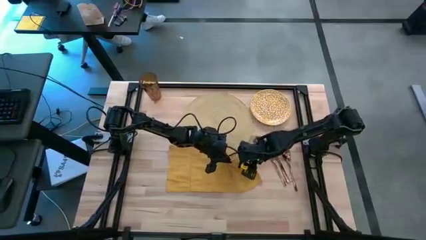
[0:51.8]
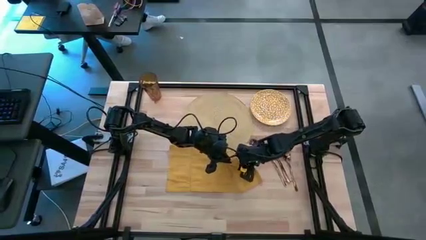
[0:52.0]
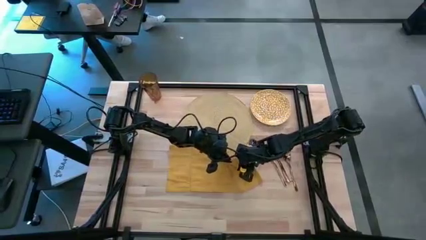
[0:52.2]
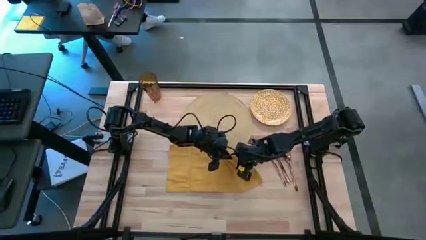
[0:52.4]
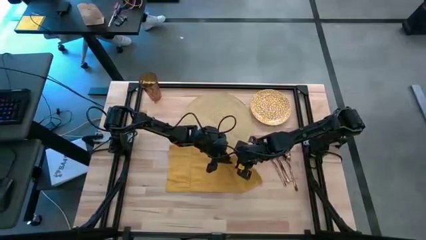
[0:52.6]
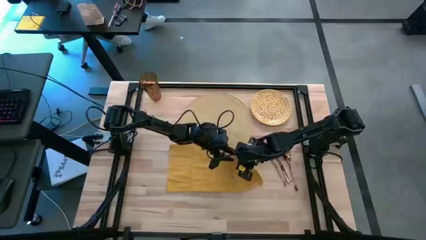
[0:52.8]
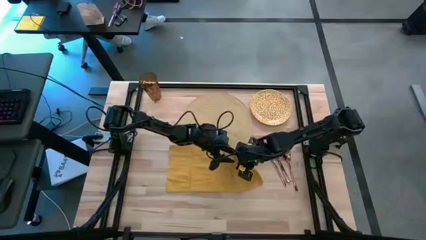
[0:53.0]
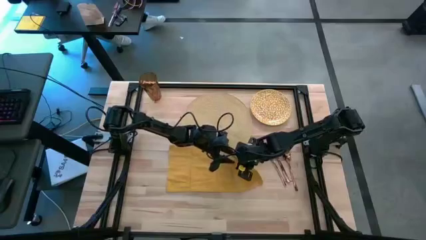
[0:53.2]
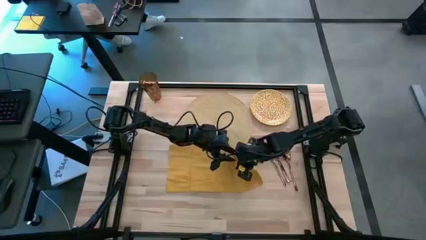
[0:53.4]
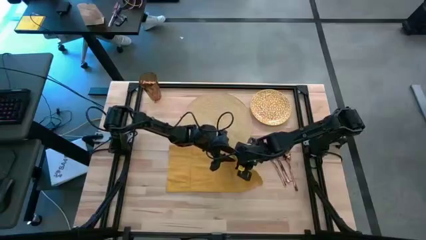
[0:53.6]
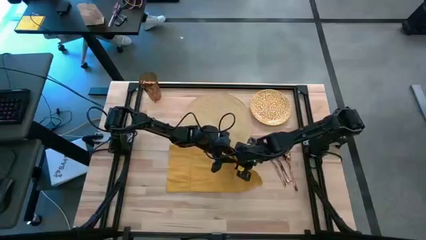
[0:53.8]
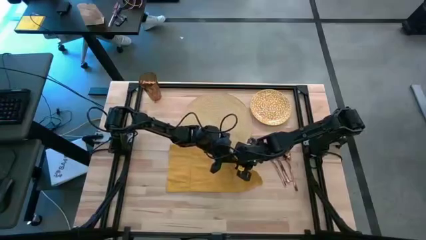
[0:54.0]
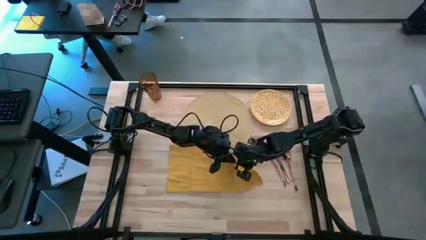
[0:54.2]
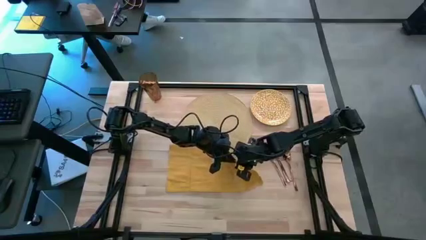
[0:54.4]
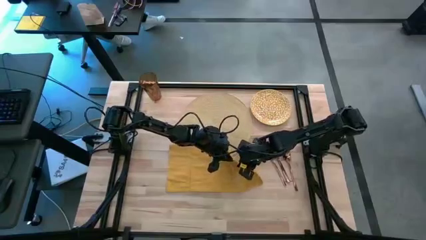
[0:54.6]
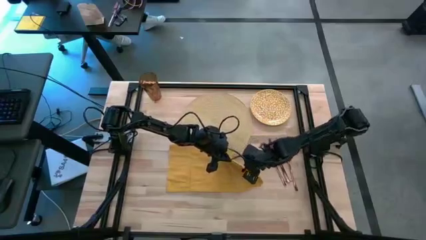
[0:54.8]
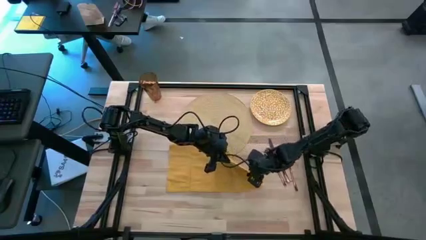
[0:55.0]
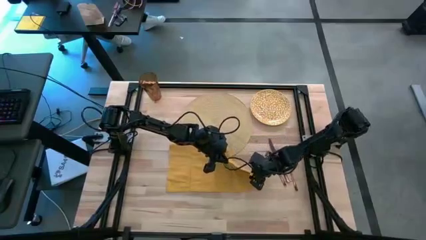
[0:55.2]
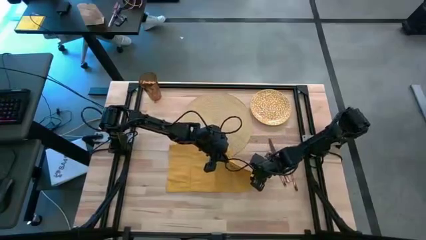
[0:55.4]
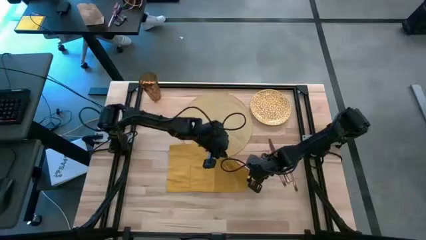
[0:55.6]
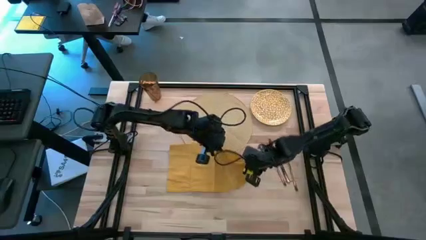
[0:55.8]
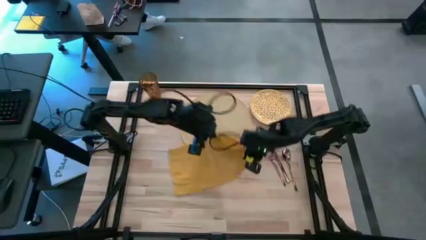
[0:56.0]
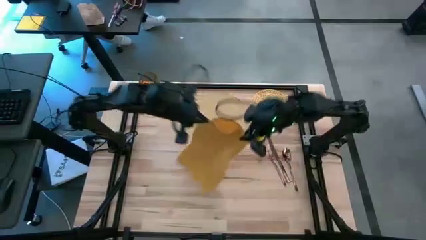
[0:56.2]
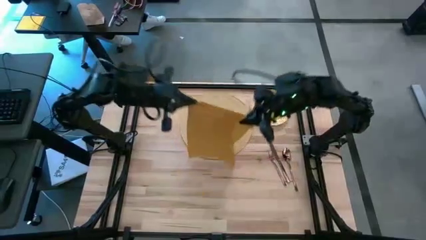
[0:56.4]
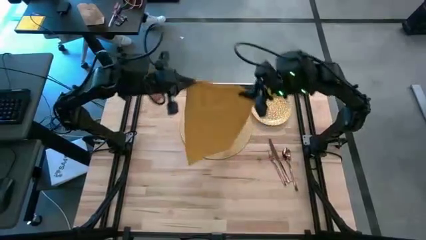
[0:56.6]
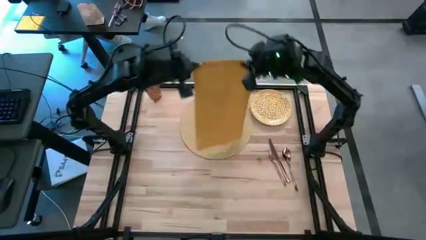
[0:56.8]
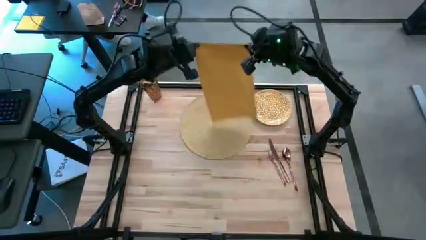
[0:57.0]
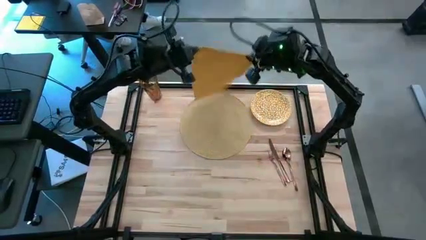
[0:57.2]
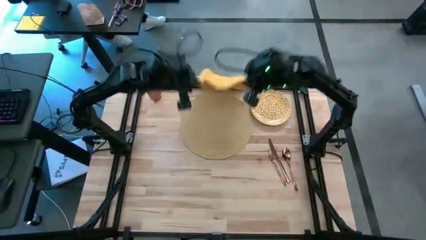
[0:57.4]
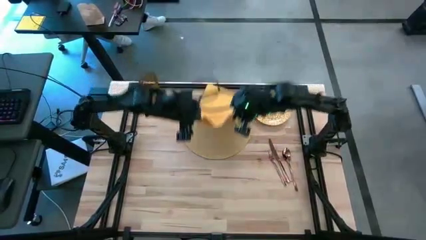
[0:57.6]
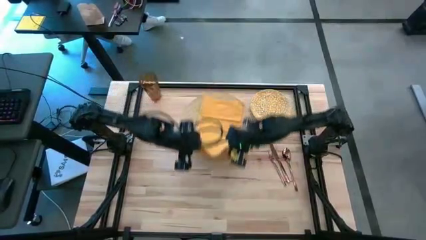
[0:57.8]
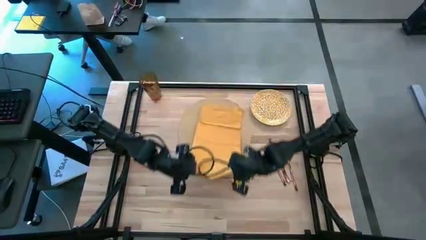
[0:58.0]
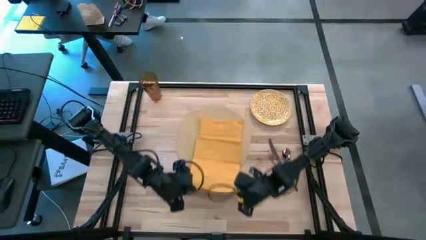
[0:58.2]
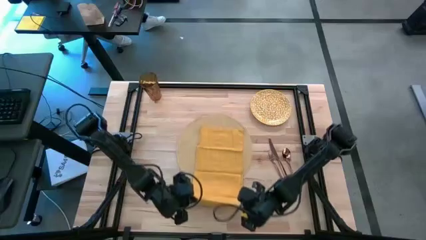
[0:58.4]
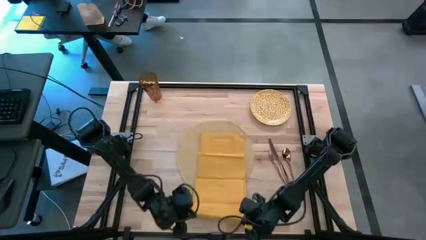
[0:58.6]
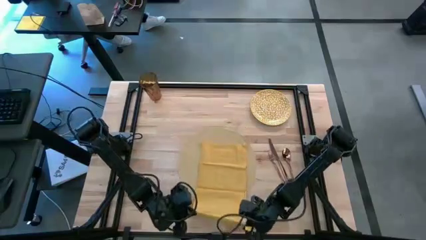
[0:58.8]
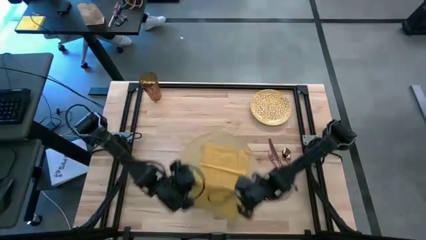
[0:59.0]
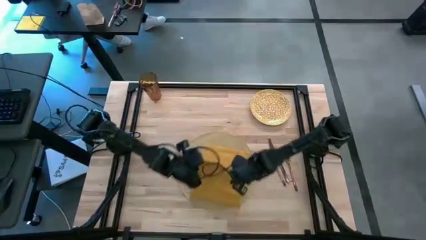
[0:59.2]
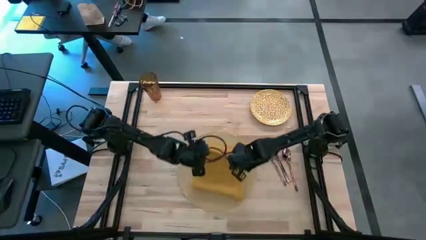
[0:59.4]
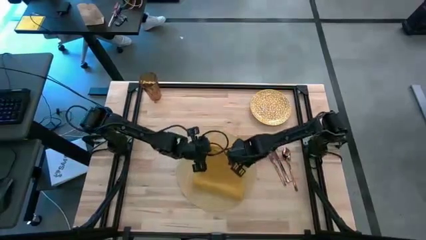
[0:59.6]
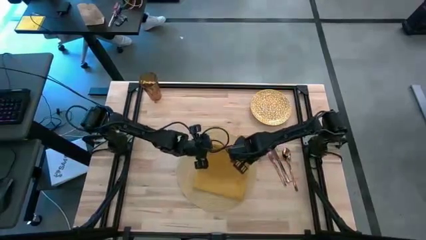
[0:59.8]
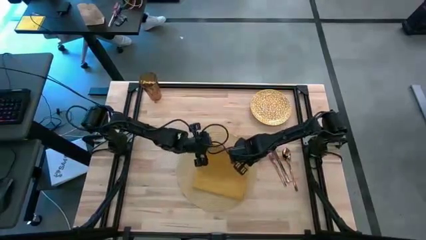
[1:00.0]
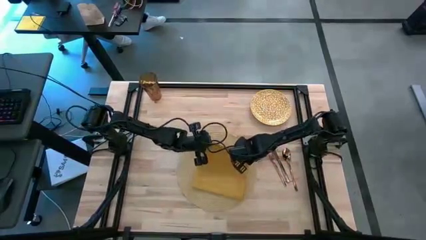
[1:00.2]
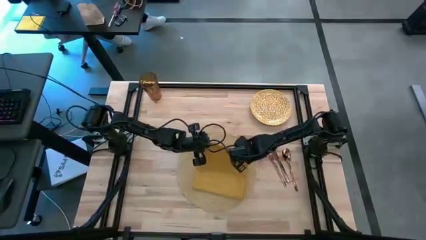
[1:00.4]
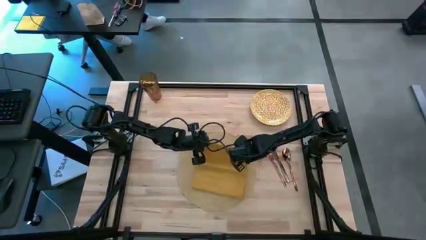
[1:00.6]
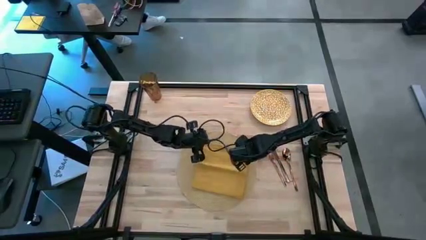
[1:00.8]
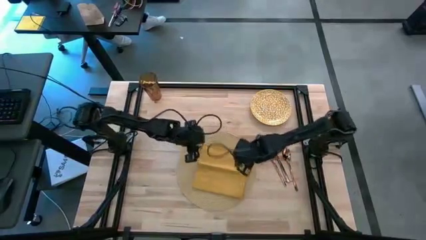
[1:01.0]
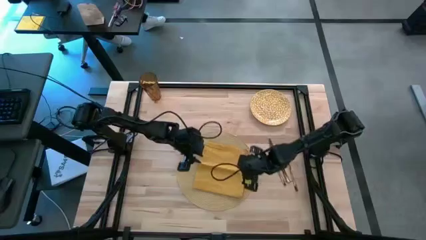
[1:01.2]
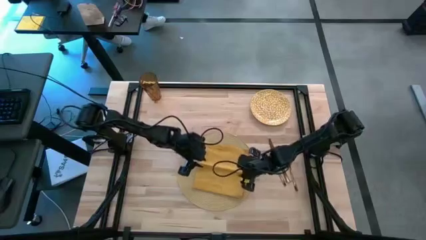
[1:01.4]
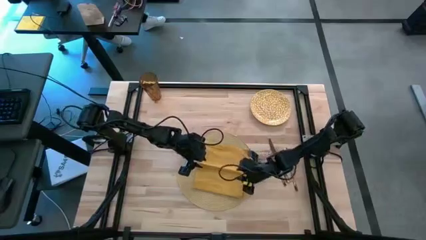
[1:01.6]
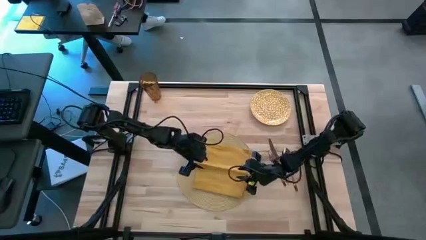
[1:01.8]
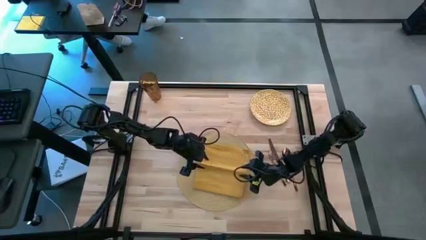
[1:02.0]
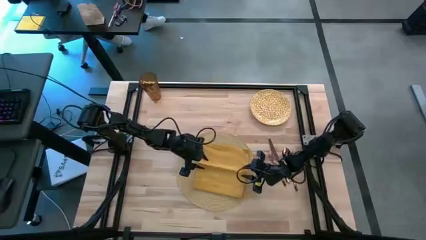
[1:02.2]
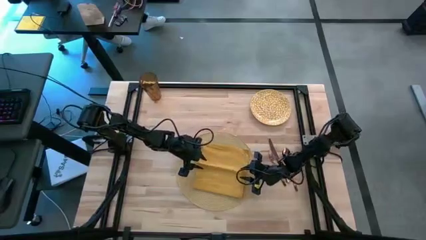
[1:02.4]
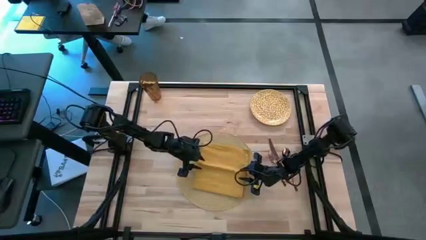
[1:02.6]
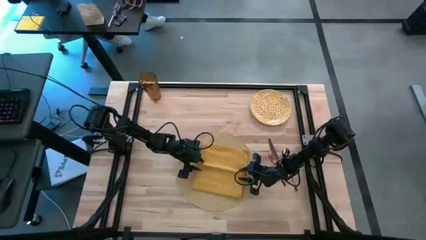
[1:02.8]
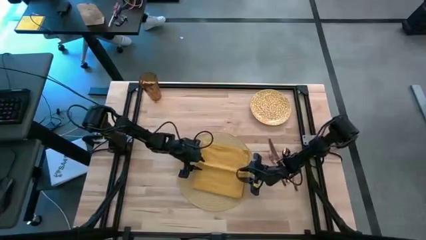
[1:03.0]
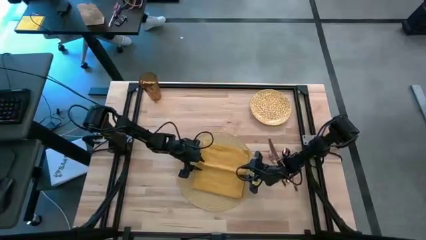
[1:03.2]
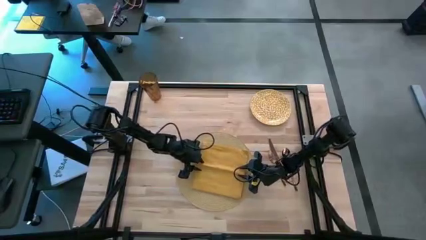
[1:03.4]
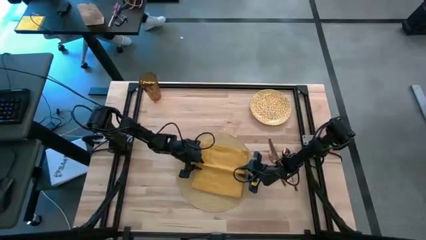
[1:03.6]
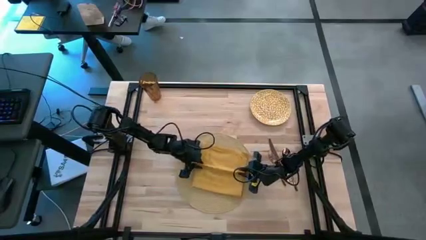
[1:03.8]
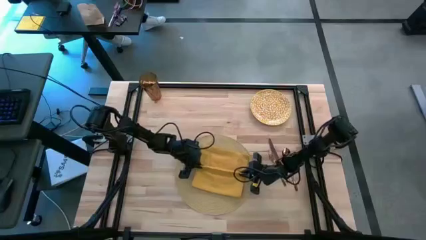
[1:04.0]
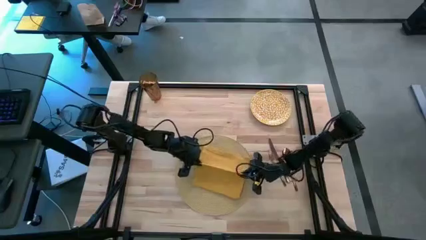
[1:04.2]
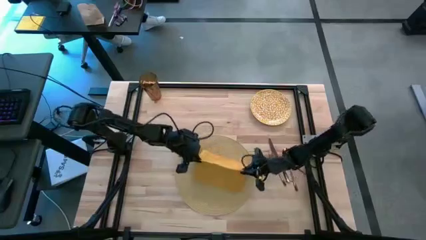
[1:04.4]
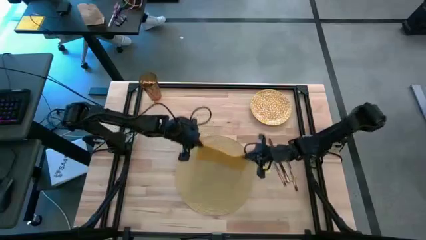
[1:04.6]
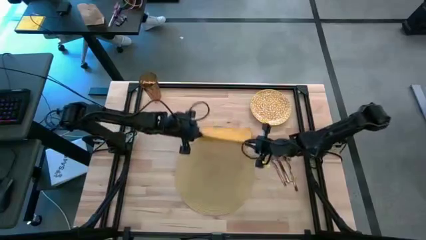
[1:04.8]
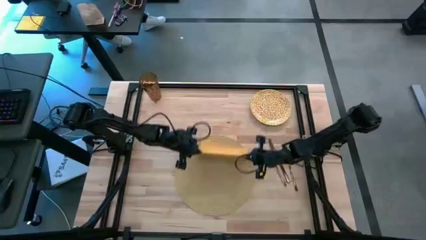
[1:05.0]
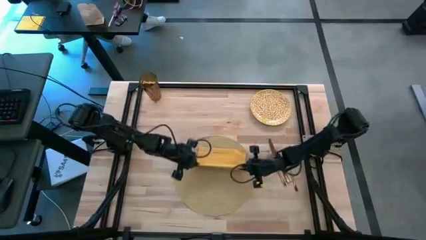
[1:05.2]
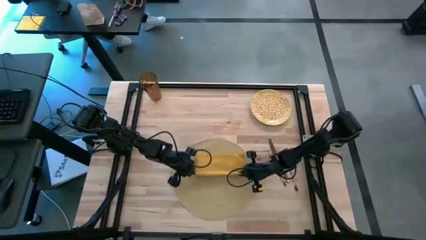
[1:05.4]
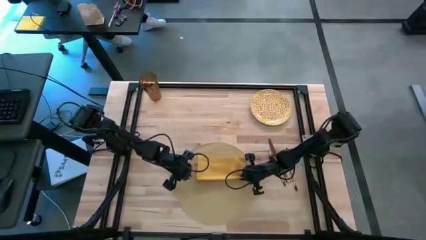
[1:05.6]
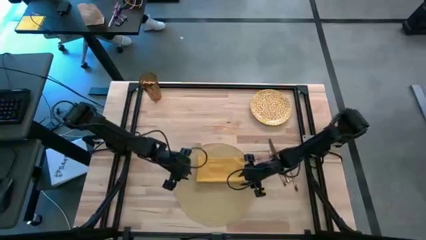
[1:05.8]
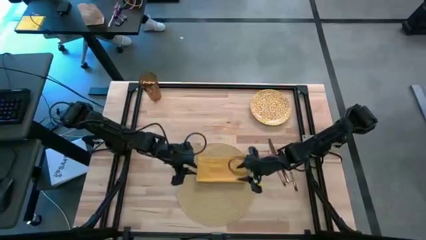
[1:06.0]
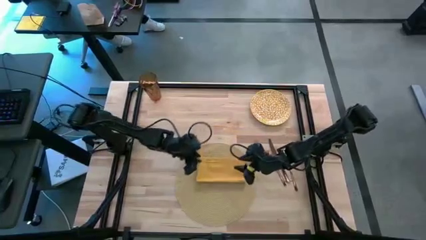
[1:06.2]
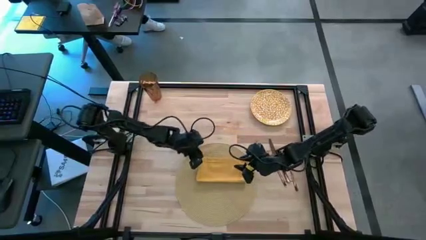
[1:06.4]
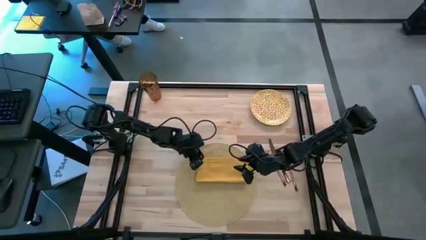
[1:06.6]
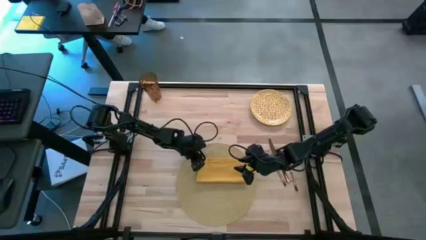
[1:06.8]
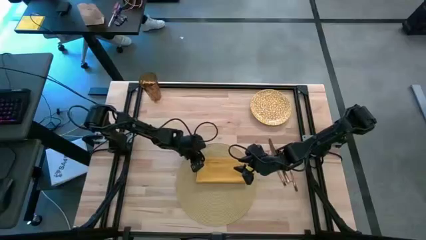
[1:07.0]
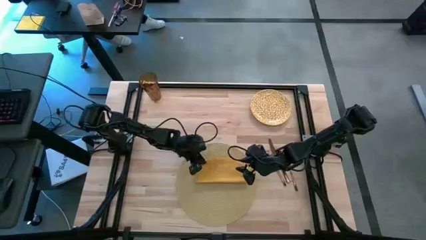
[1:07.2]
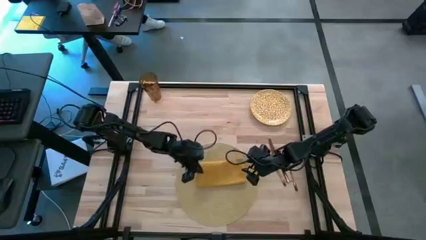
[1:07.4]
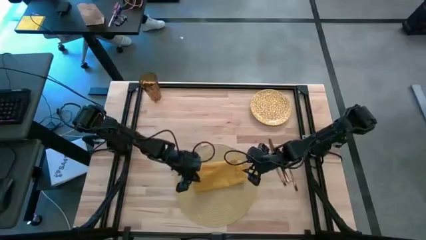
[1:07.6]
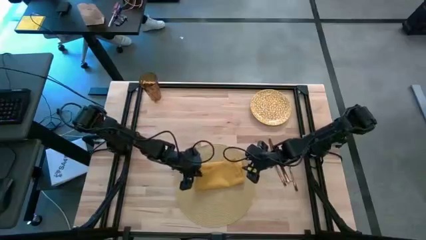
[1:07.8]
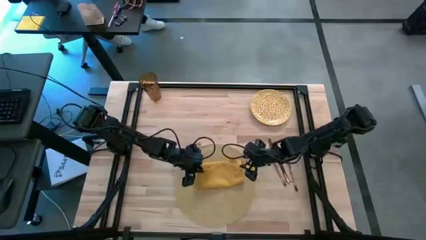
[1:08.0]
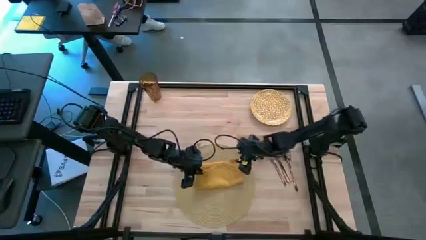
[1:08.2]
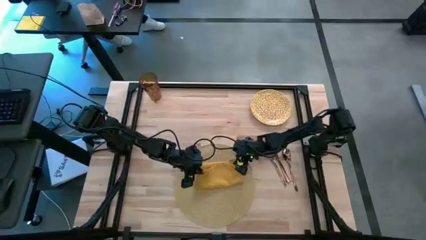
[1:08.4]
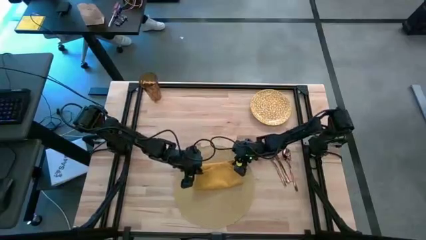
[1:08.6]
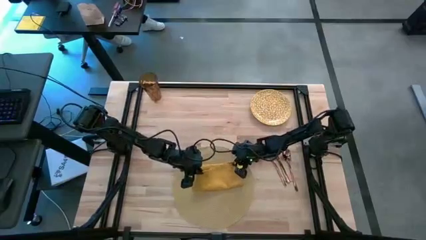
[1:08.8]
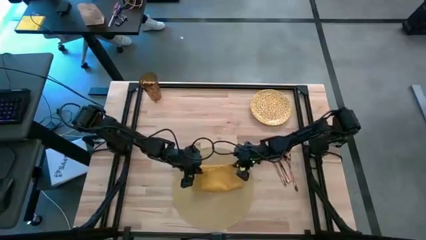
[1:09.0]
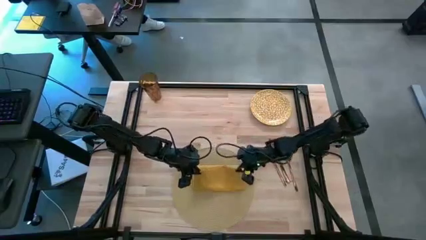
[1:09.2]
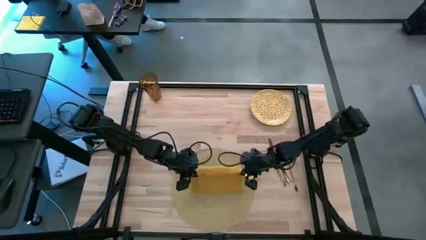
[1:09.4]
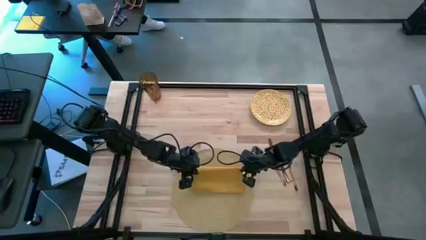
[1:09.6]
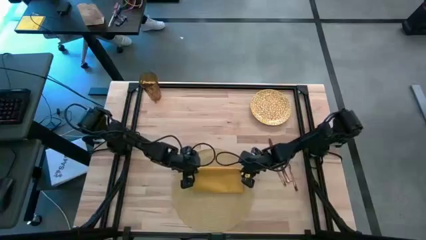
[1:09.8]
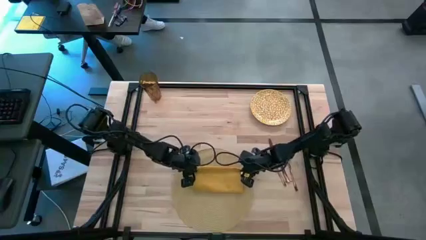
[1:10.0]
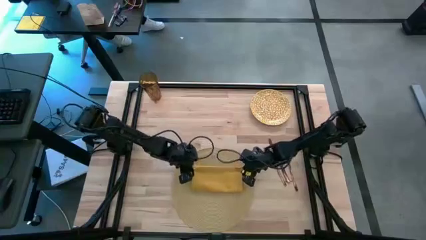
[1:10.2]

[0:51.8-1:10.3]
Task: Set table place
Fold the yellow table napkin
